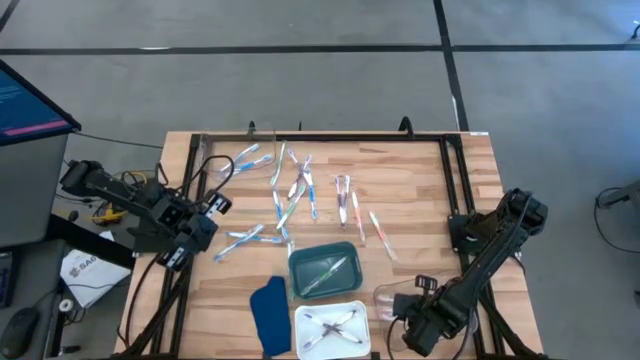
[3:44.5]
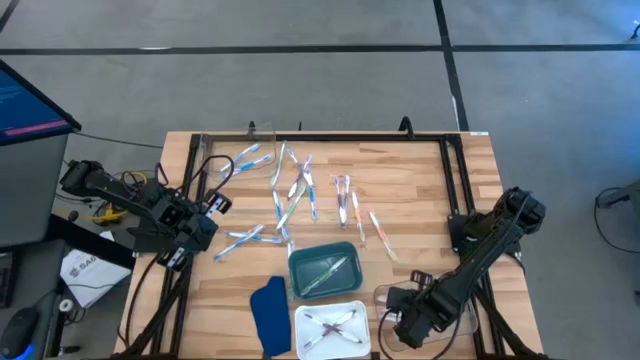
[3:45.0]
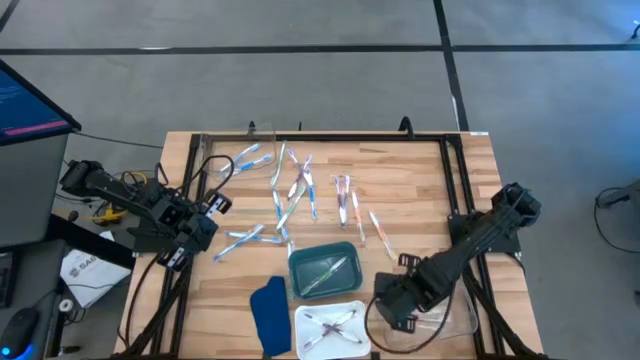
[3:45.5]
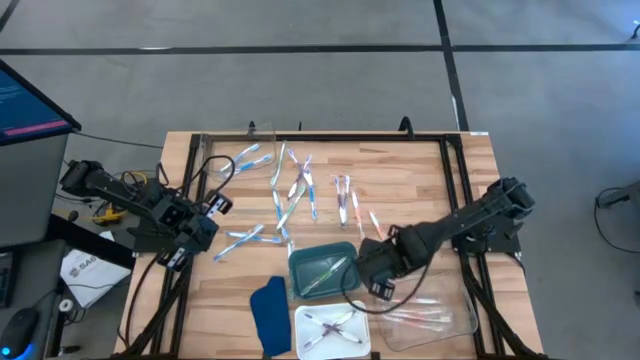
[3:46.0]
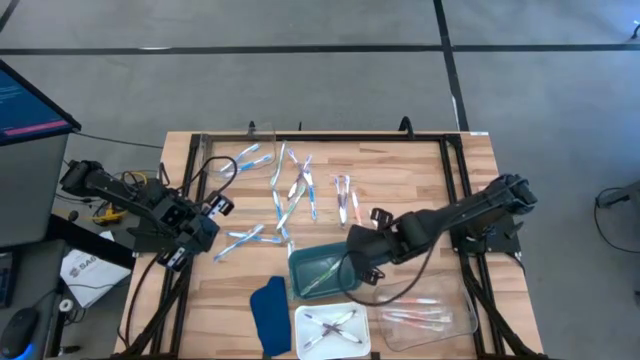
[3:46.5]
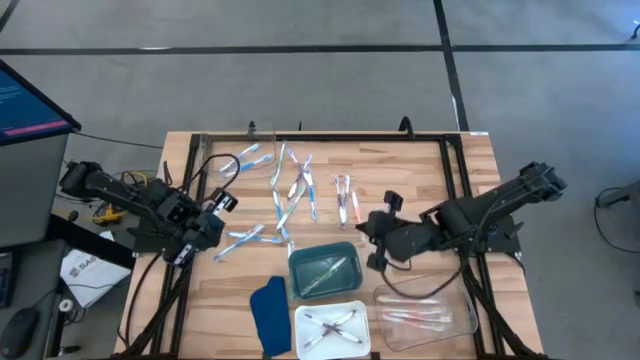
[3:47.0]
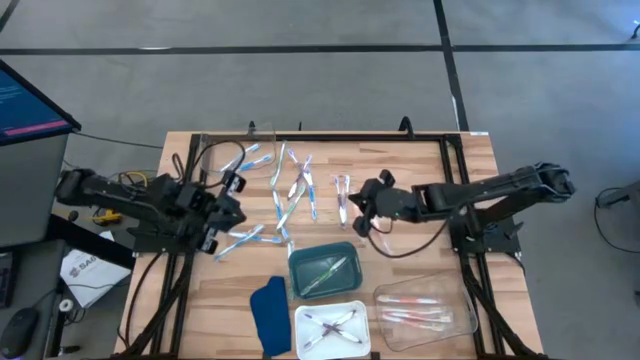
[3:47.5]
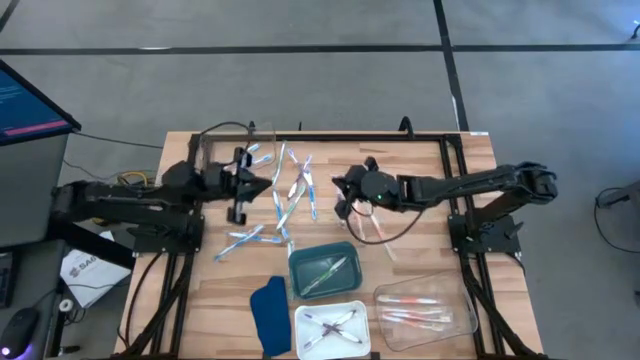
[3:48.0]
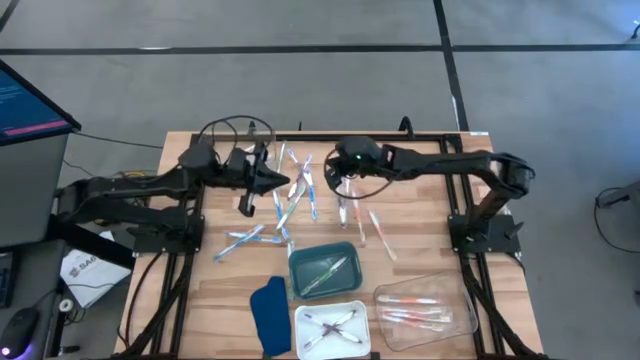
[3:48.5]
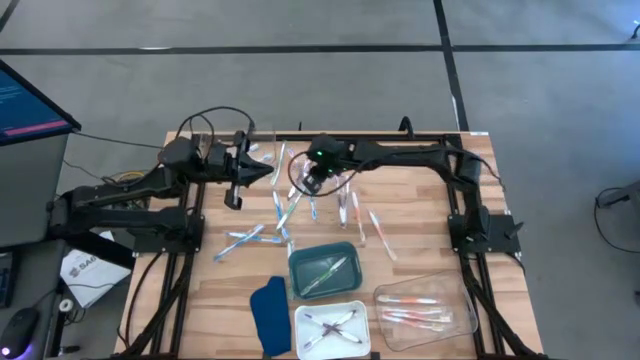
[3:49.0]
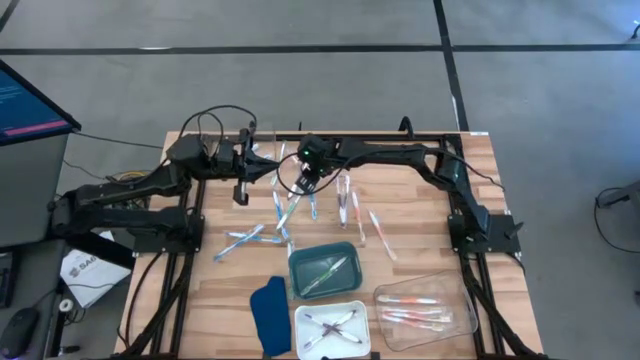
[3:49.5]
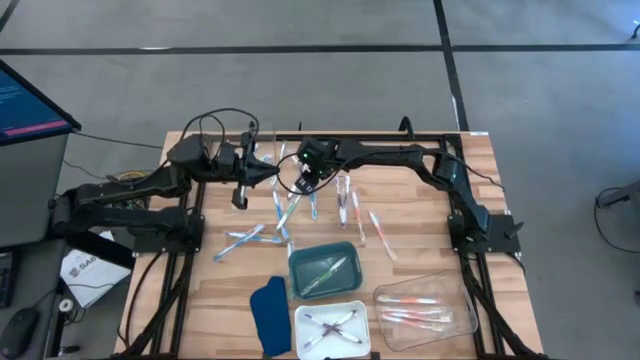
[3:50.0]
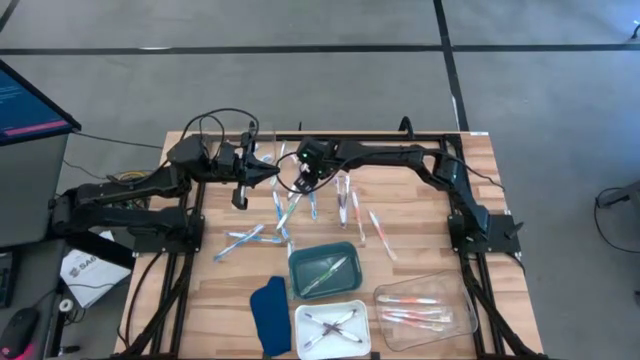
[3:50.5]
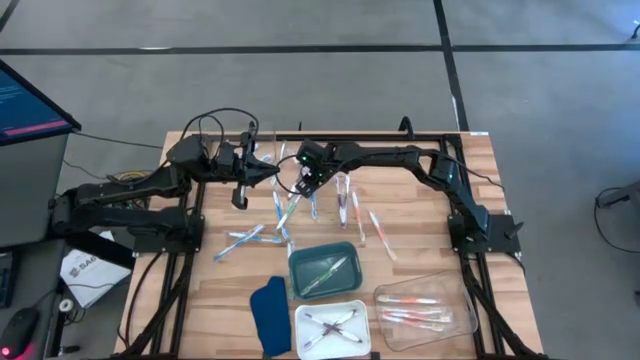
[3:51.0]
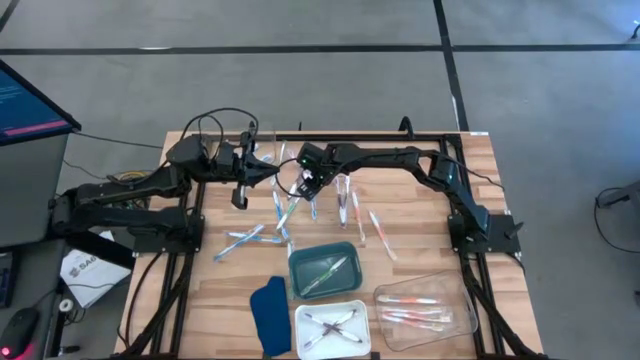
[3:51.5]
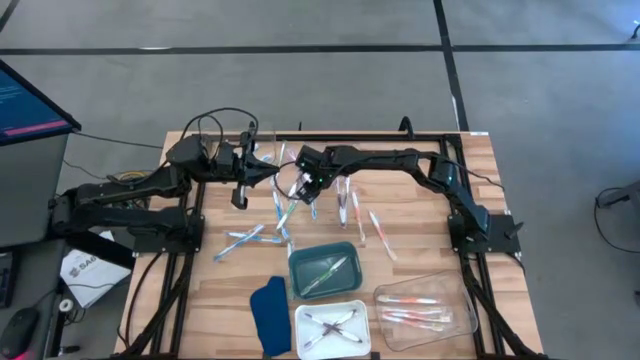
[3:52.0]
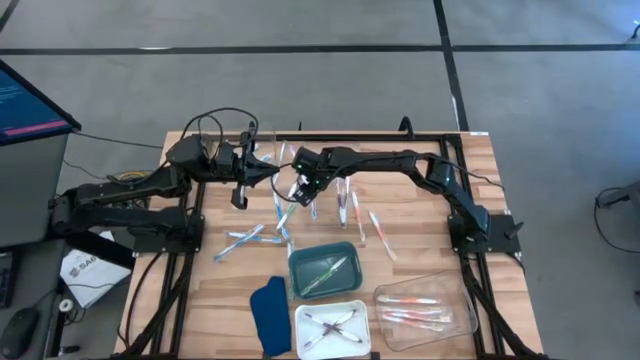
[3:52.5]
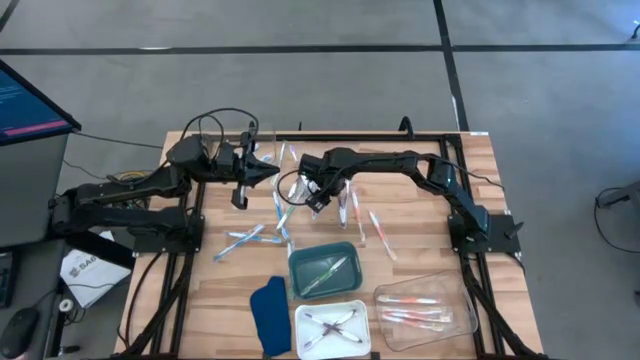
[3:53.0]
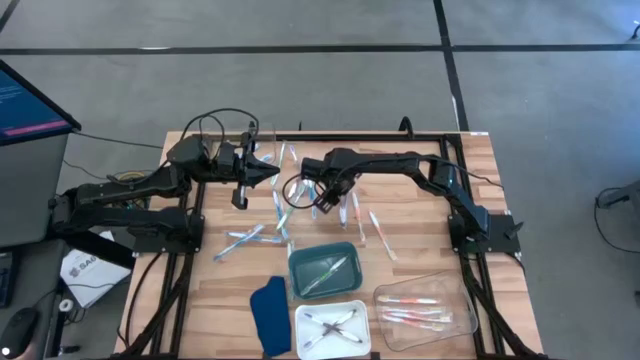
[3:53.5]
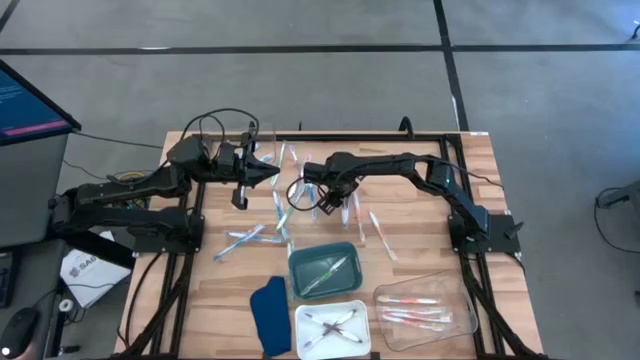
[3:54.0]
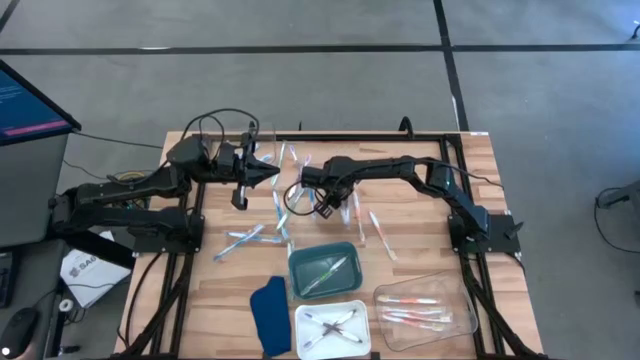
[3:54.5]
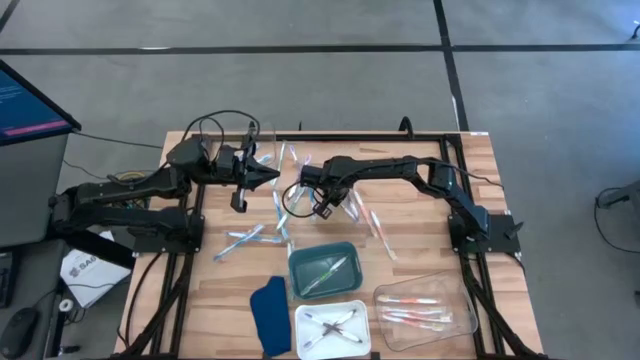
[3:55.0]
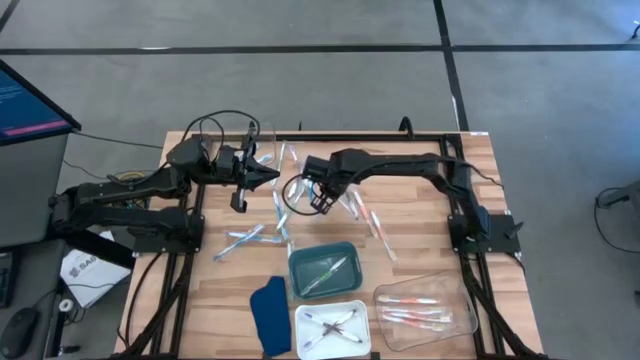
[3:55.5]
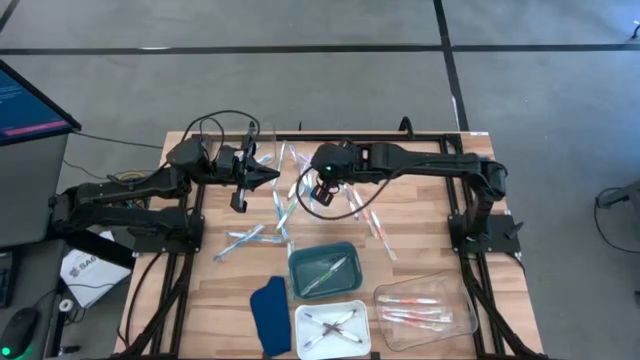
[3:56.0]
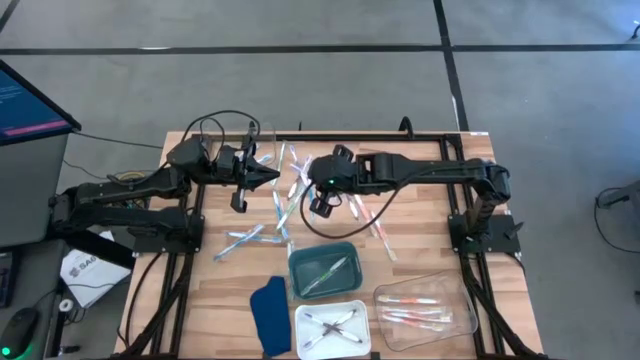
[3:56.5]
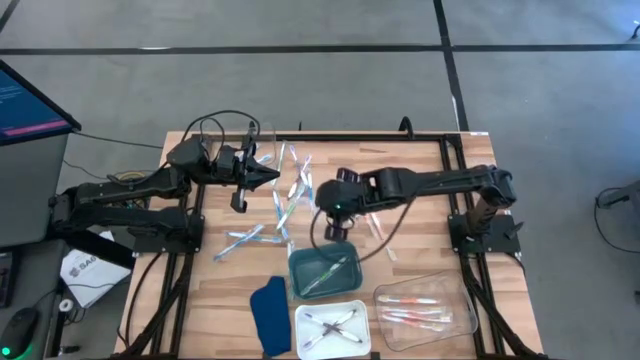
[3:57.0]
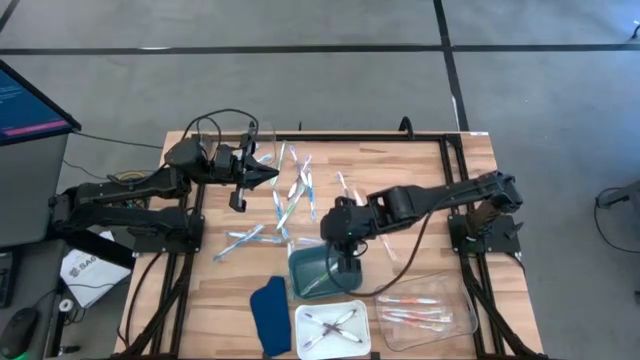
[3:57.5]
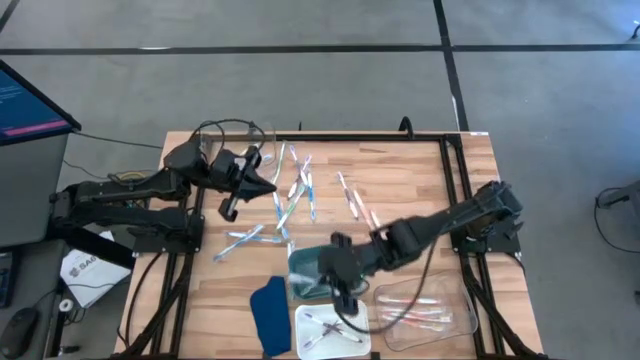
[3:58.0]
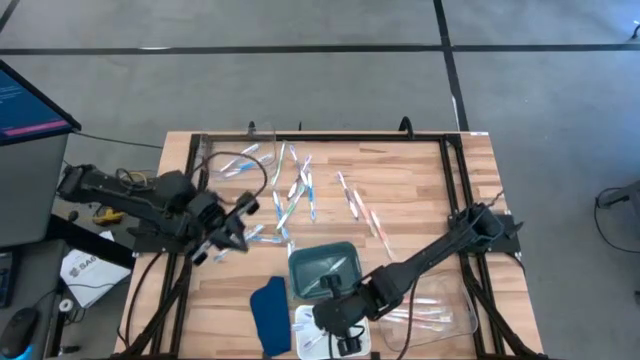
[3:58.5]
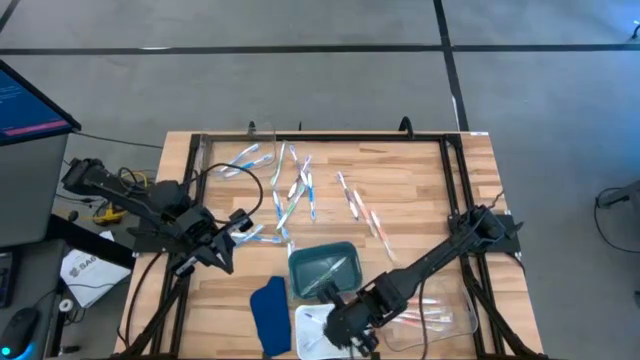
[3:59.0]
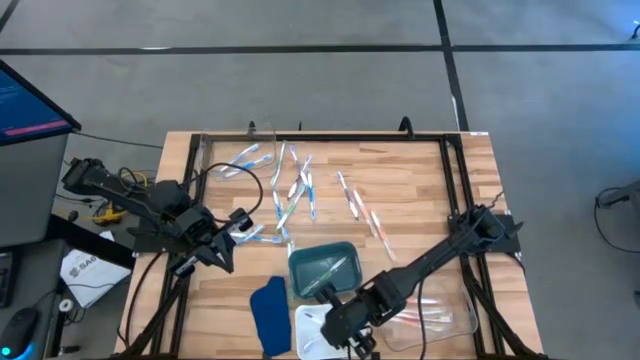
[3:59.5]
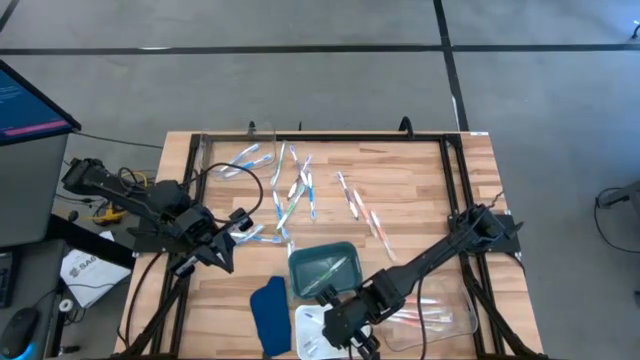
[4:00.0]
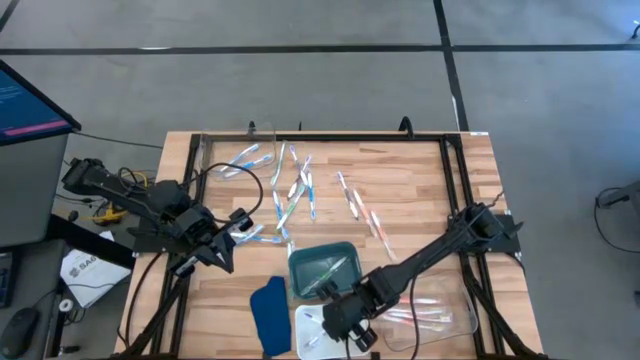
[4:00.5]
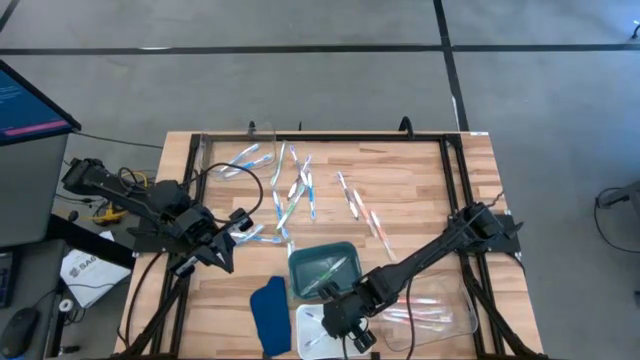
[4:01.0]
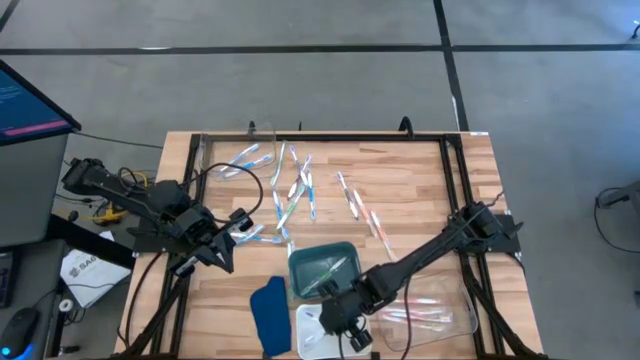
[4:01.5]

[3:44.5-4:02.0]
Task: Pick & Place Toothbrushes
Put the purple toothbrush into the white bin

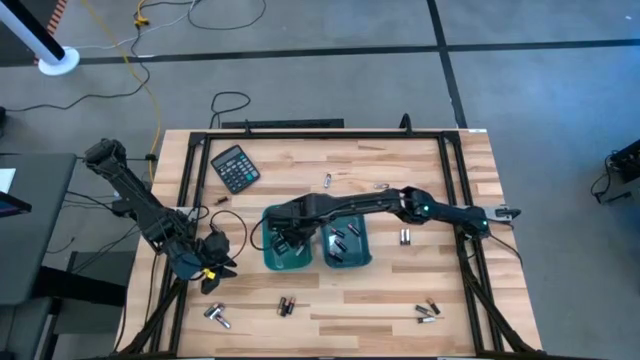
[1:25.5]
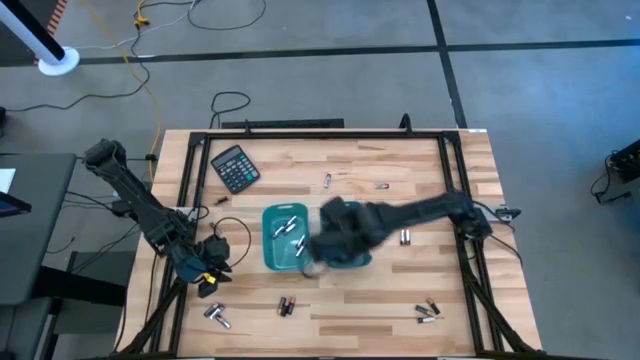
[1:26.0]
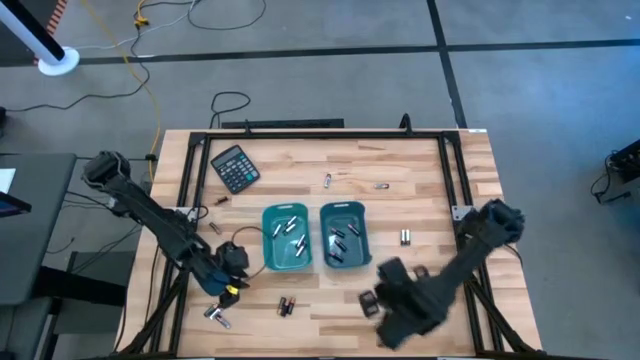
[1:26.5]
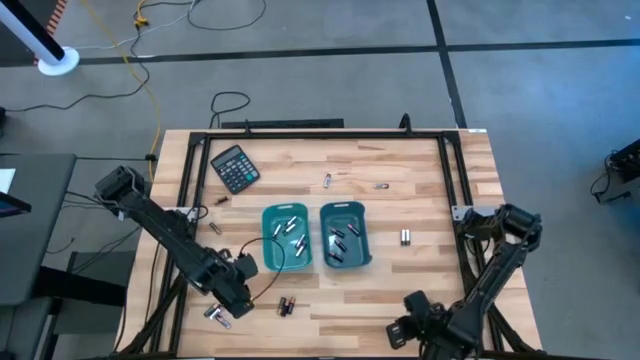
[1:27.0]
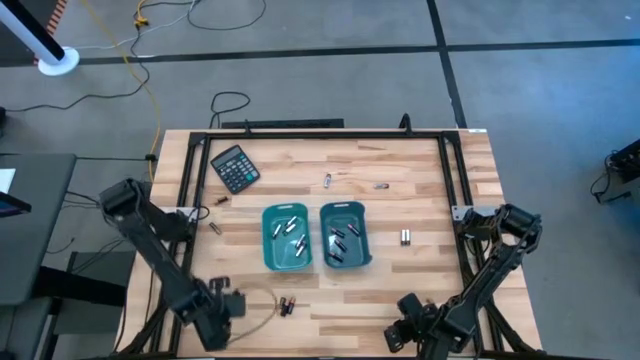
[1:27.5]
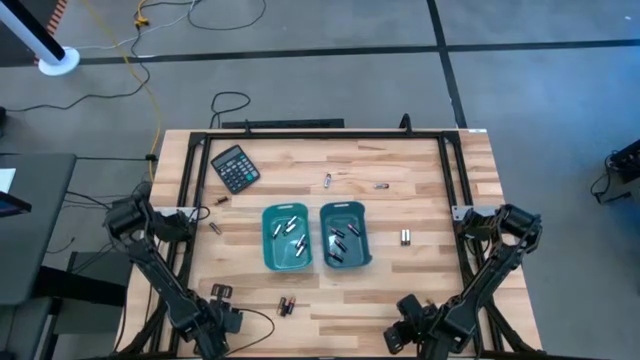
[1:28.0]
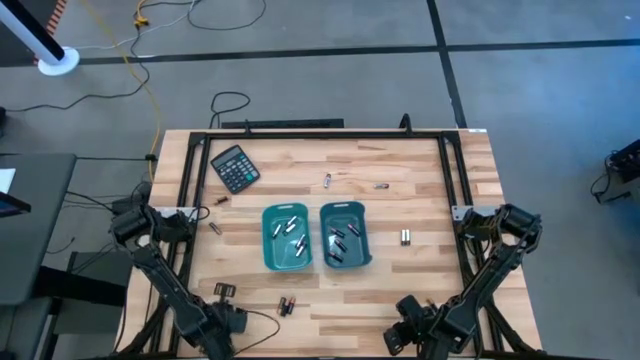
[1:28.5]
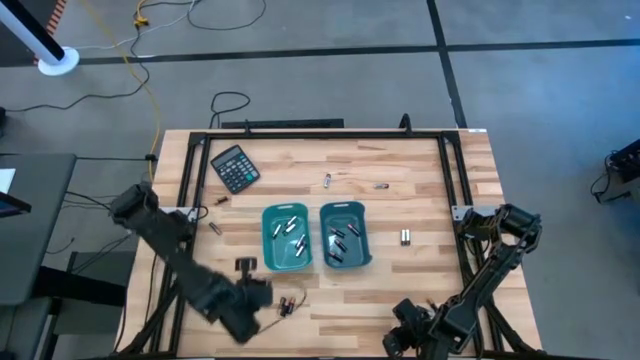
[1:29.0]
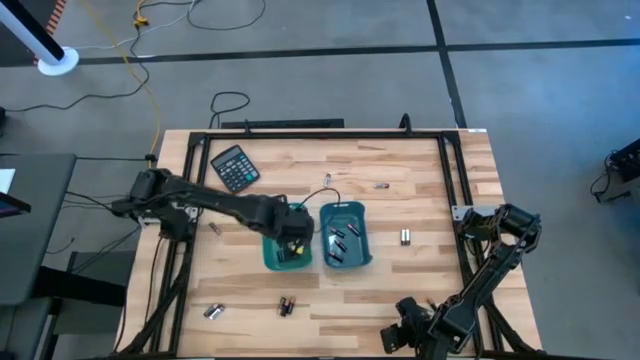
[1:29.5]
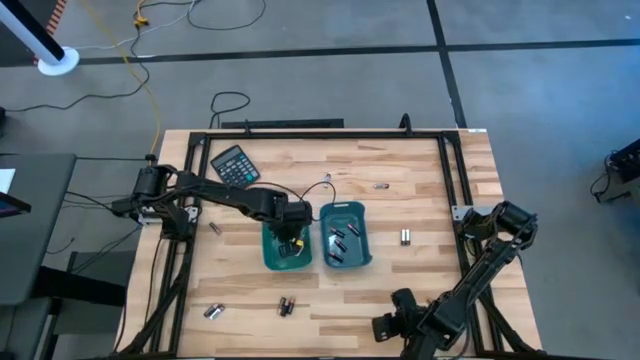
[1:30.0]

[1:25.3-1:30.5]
Task: Sort batteries
Put the silver battery into the green bin
